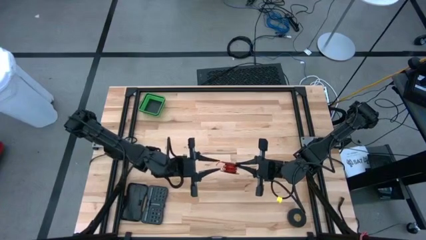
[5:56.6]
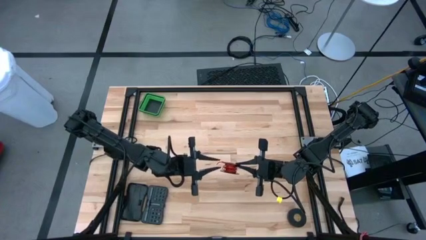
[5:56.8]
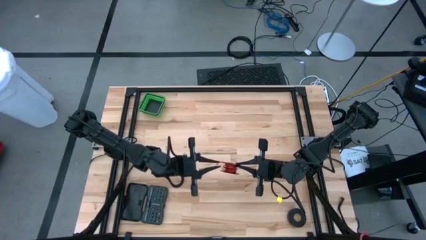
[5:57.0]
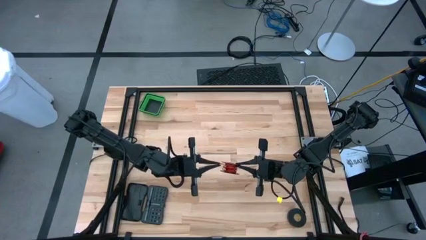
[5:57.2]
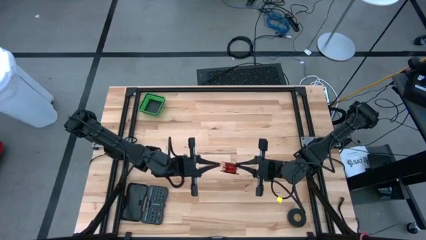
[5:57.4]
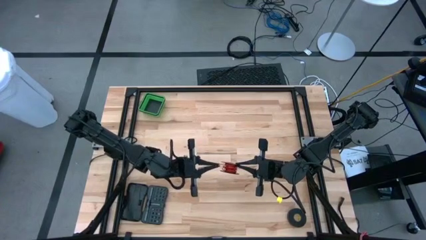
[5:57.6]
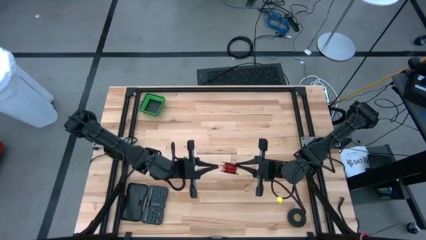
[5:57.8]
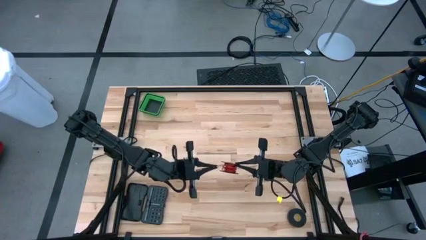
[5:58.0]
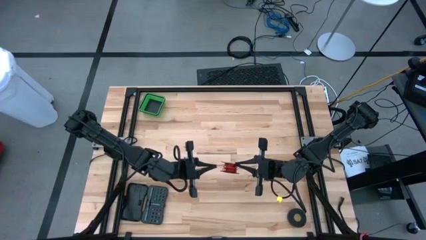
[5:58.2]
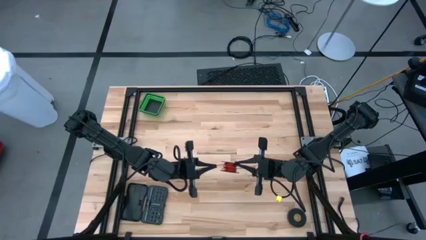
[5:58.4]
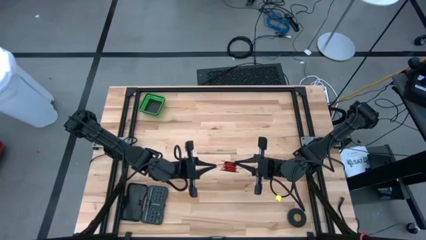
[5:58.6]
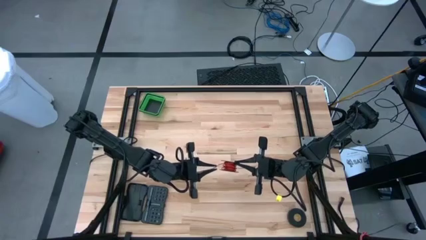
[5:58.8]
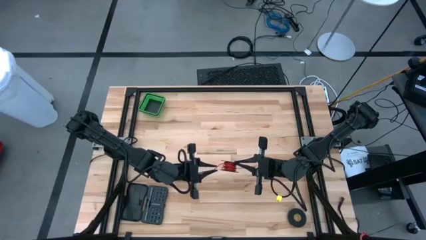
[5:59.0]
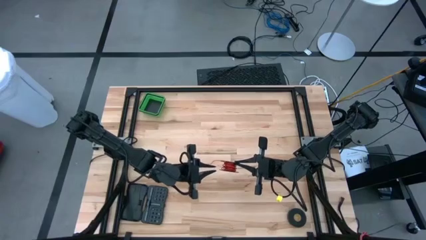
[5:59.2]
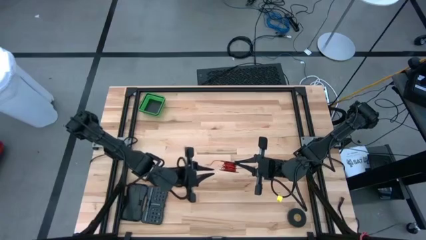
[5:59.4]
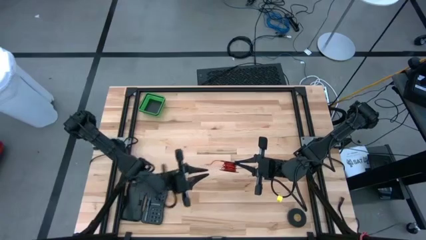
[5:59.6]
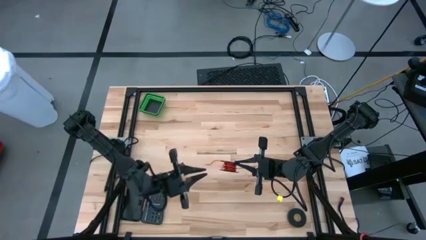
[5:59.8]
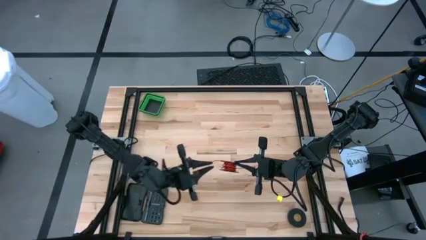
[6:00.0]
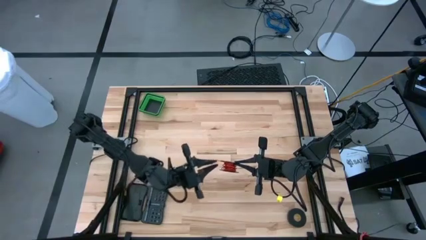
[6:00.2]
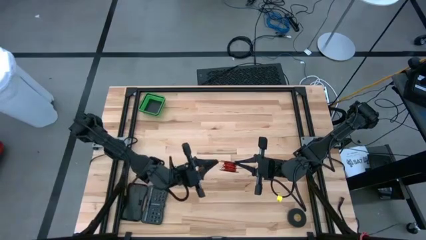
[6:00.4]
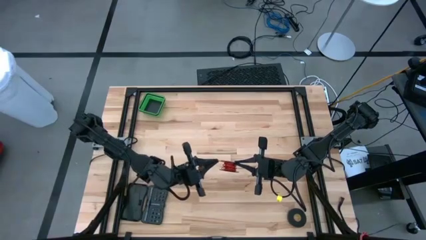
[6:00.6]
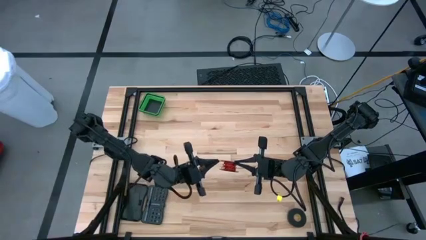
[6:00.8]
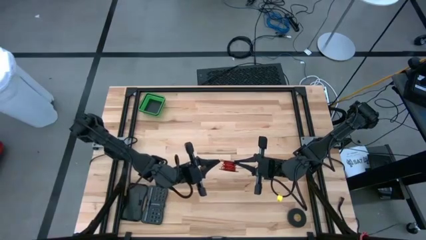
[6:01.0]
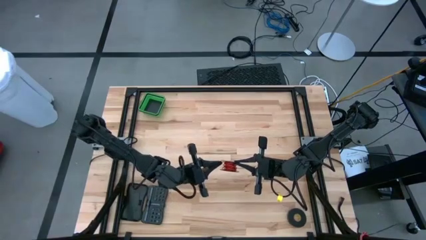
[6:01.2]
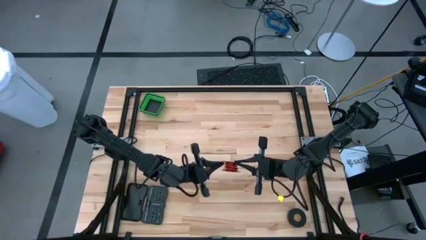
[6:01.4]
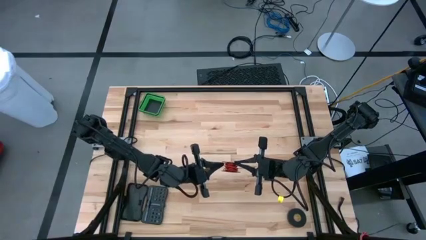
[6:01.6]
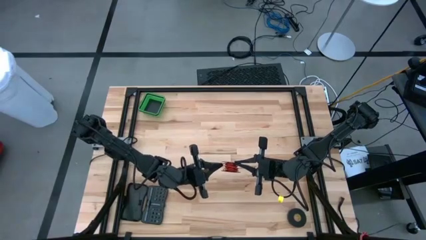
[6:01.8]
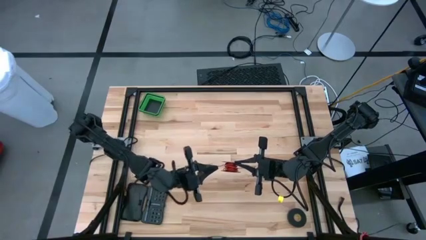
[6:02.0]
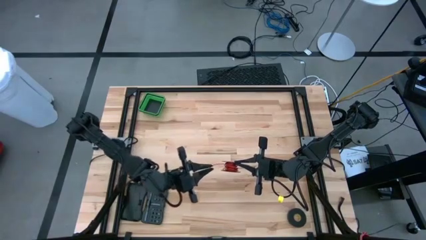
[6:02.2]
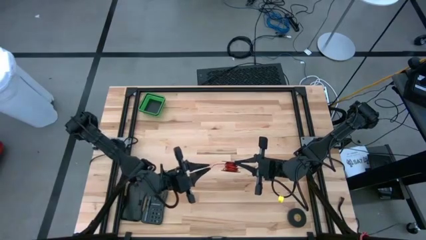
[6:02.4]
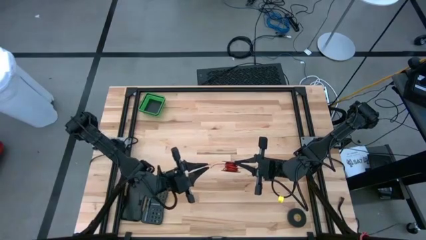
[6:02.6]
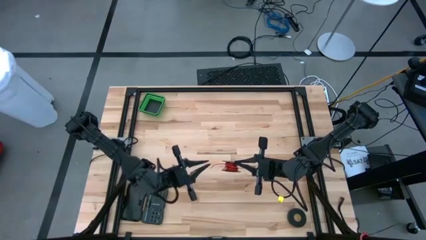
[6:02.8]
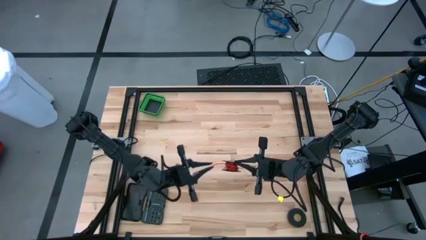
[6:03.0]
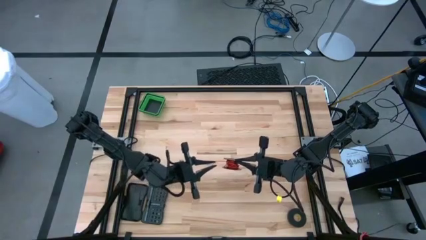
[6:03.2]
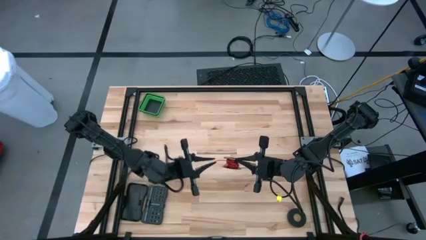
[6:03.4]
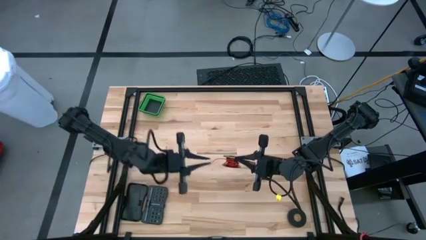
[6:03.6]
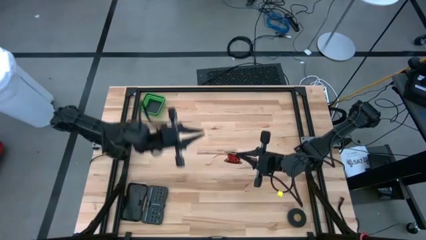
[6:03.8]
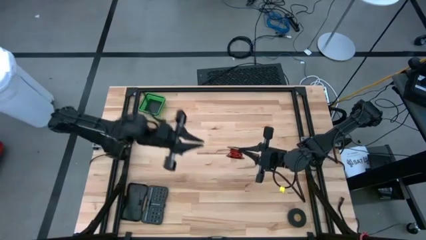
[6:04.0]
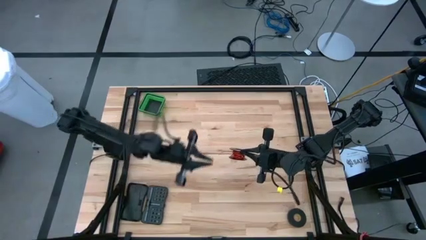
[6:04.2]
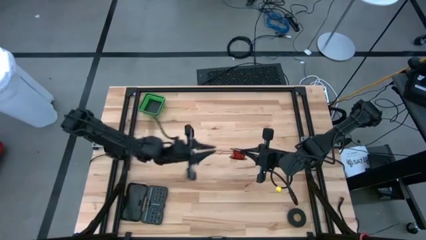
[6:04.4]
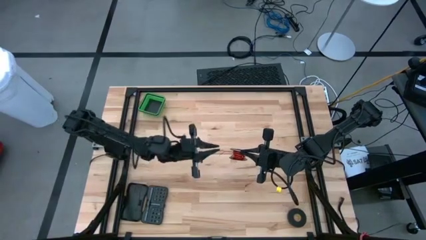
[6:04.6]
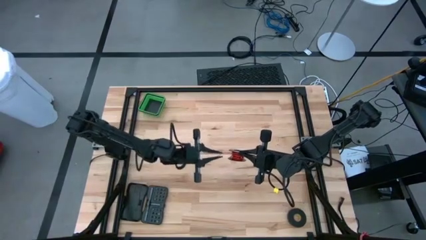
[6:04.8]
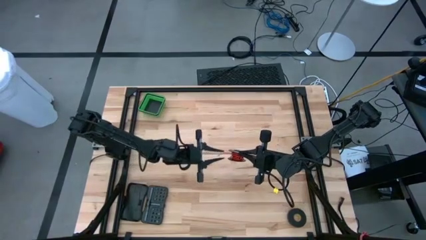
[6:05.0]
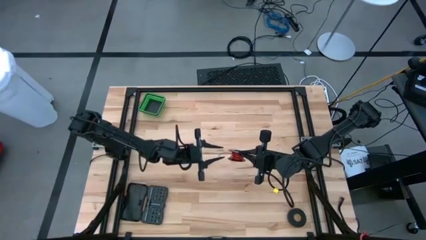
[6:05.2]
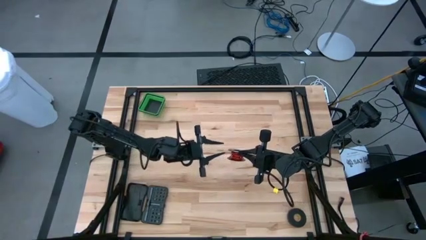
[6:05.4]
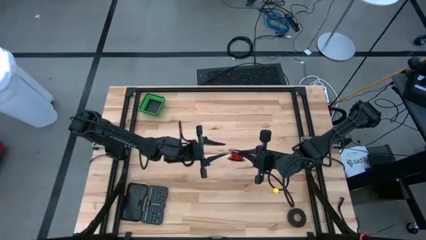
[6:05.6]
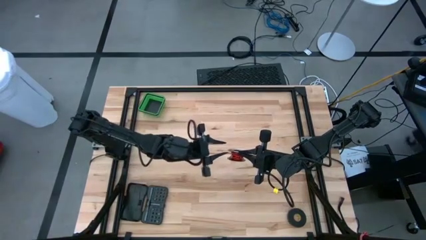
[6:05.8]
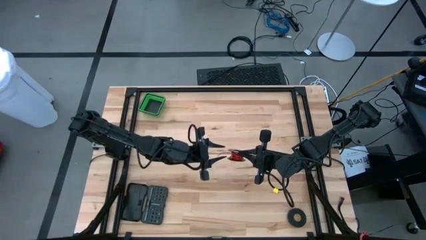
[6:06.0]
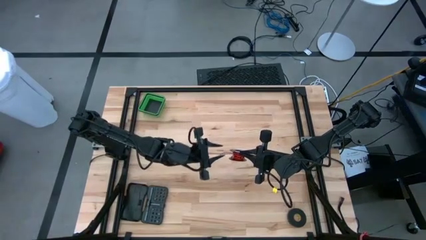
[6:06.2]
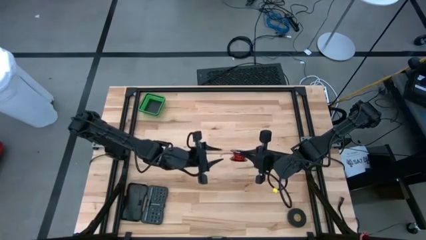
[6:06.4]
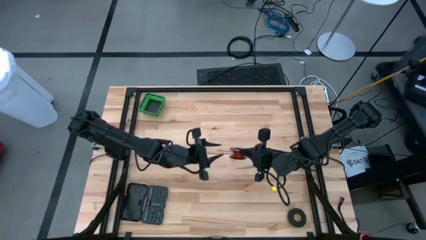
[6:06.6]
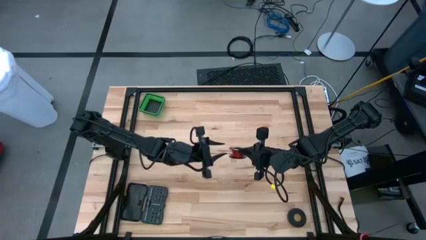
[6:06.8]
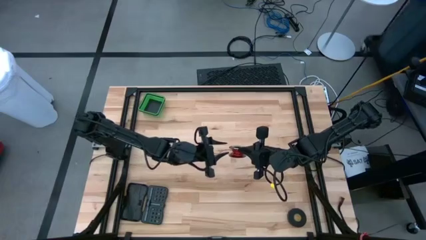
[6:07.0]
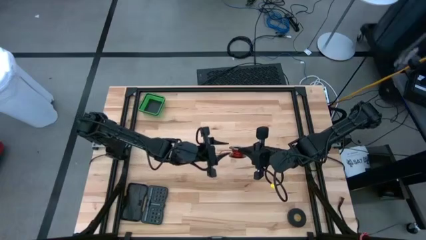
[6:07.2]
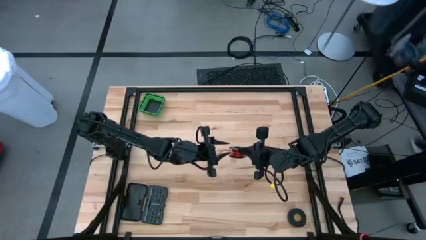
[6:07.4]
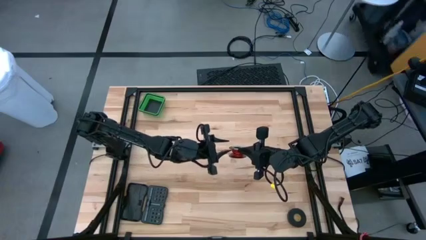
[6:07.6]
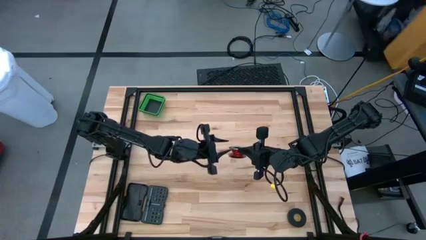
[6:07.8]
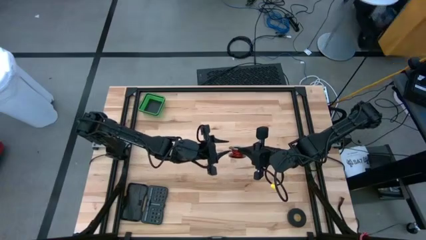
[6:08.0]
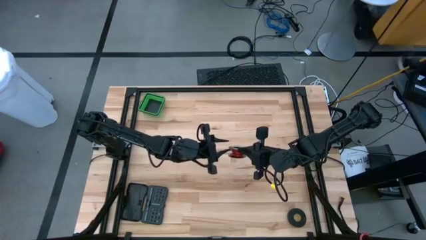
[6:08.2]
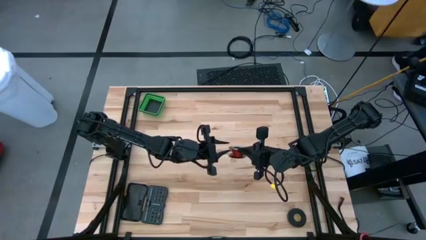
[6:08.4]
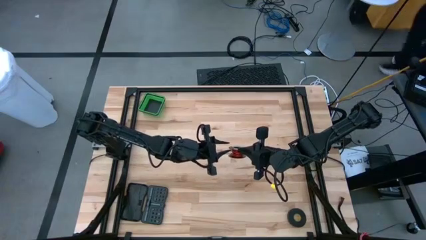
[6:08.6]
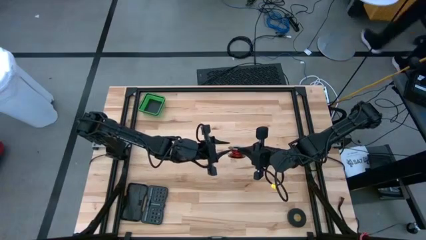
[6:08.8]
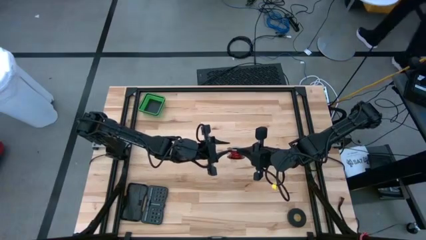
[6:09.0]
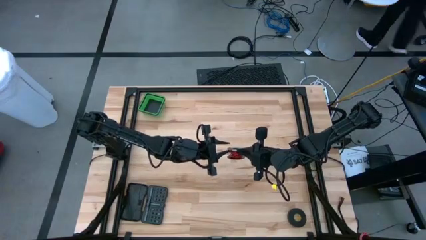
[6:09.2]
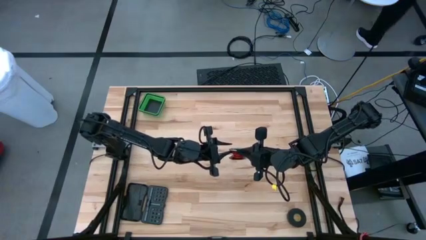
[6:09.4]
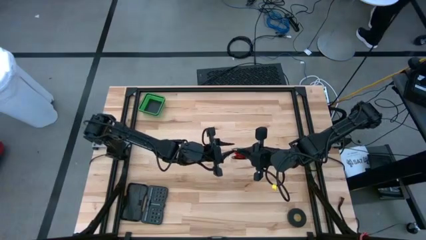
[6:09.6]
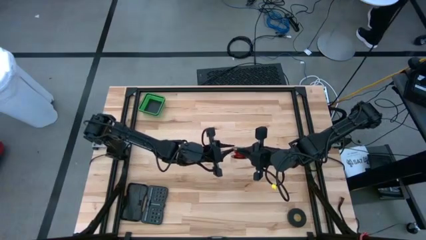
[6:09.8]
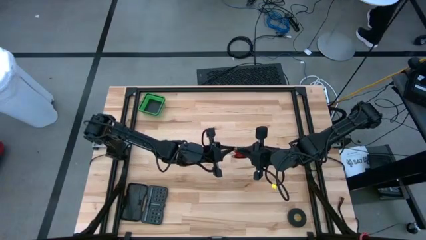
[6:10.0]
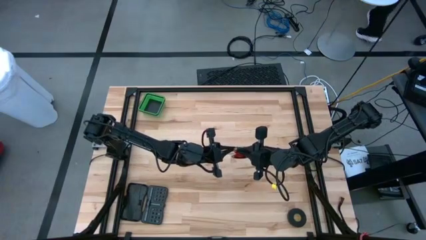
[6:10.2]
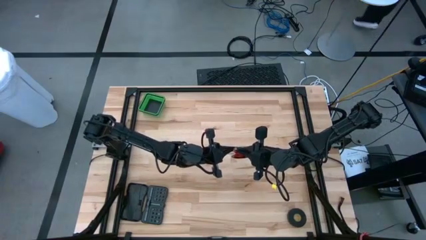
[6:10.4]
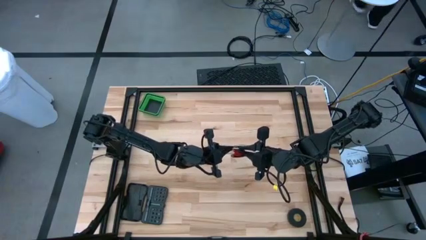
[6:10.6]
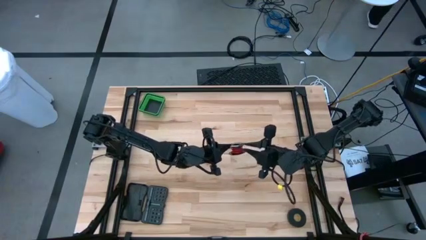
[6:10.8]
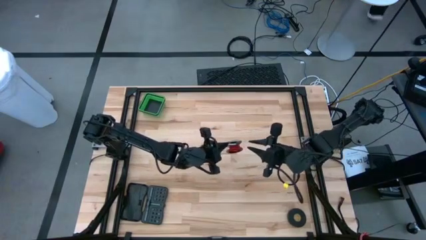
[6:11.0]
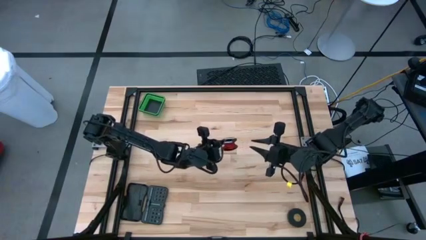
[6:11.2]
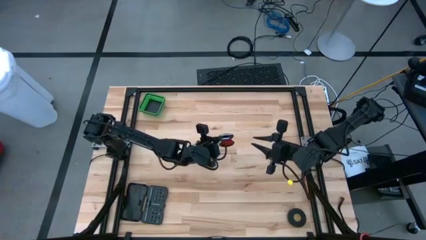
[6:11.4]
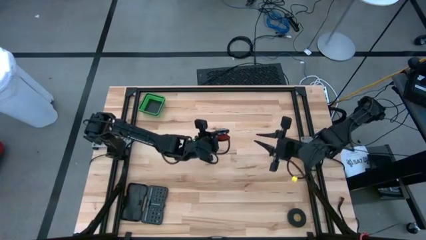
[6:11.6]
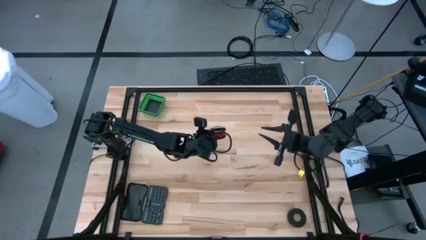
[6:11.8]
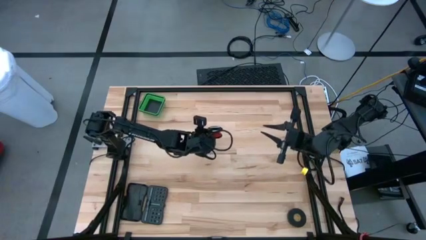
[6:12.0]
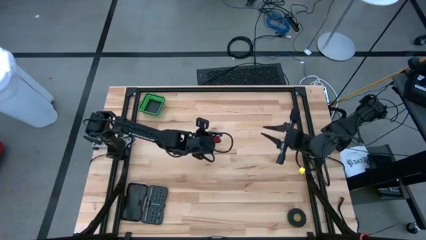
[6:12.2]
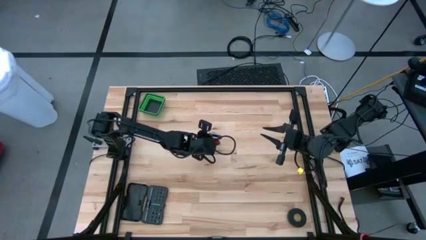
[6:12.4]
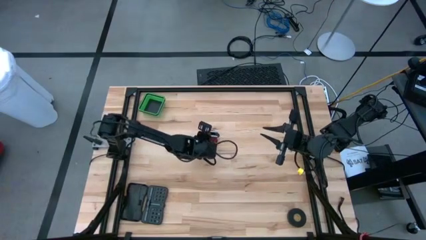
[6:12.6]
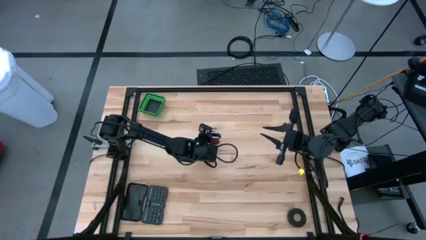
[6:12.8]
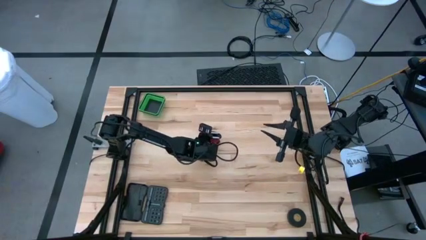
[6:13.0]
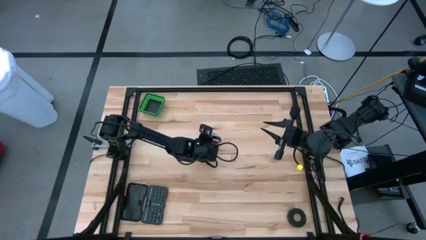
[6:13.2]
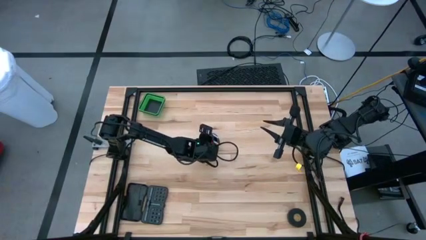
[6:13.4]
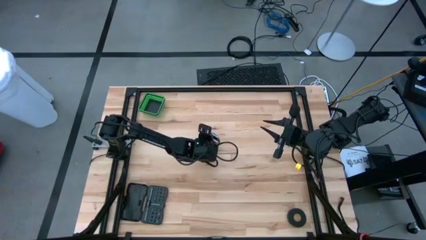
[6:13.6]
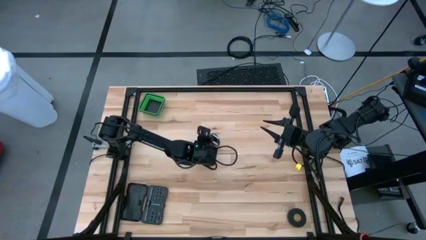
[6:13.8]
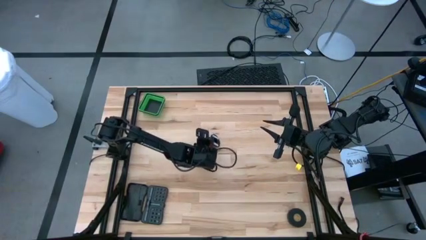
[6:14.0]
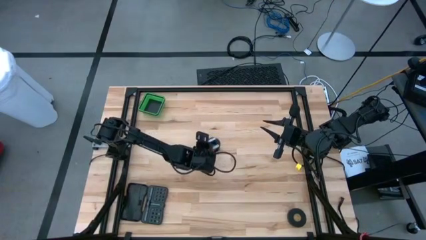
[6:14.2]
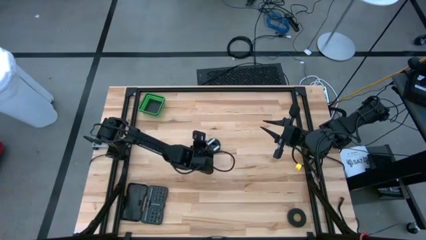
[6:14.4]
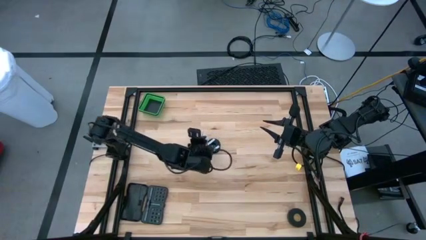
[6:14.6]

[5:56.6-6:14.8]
Task: Coil cords
Coil the red wire into the spool
